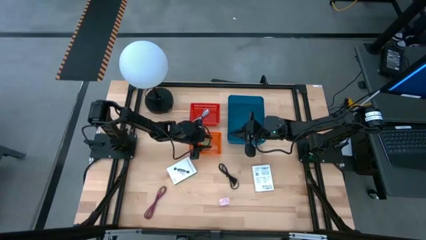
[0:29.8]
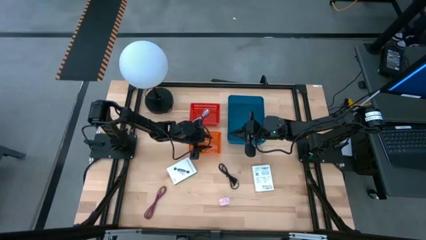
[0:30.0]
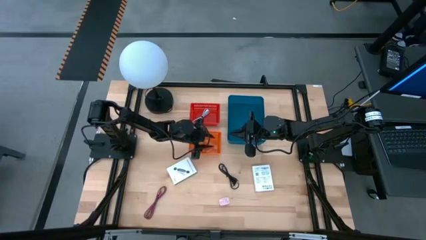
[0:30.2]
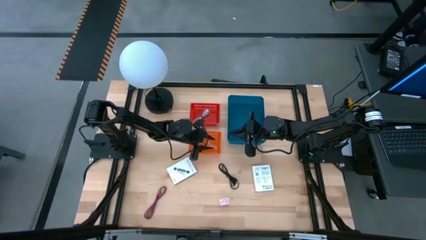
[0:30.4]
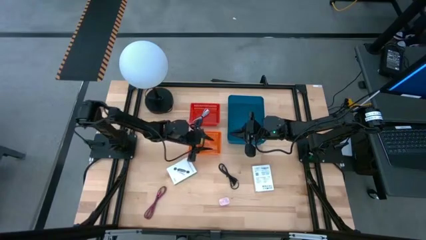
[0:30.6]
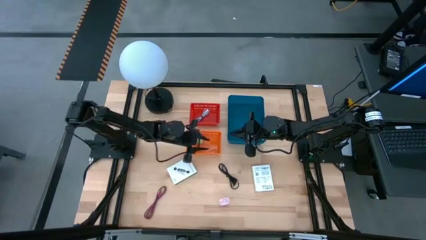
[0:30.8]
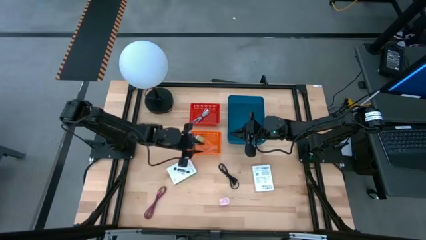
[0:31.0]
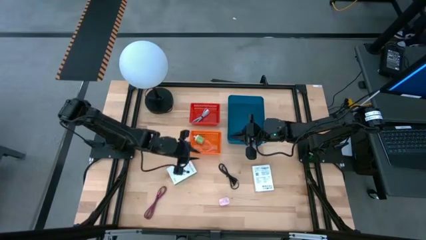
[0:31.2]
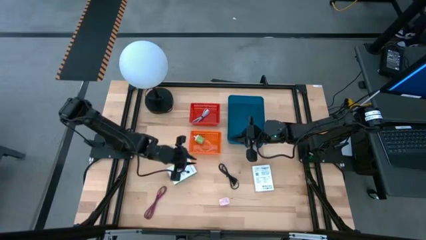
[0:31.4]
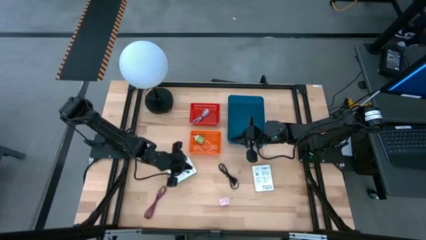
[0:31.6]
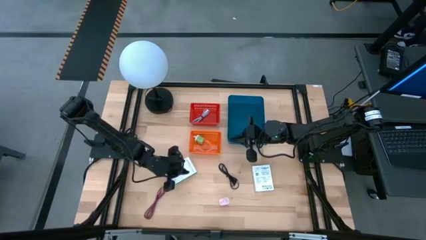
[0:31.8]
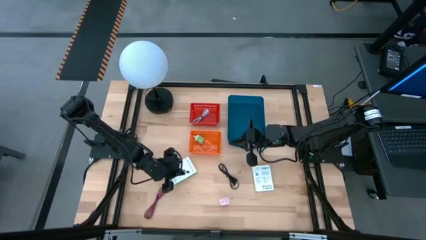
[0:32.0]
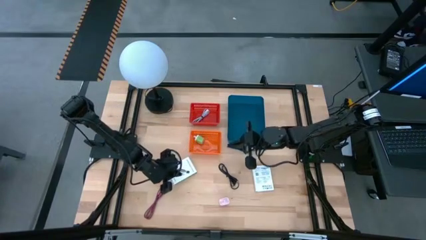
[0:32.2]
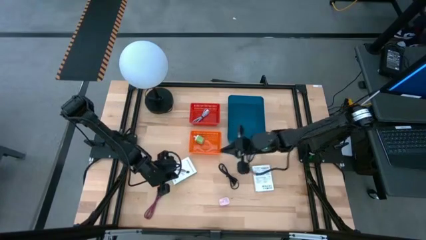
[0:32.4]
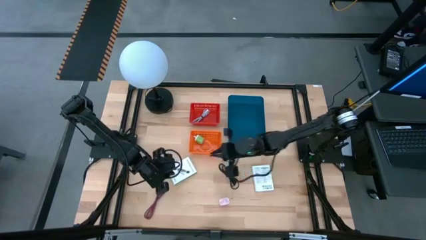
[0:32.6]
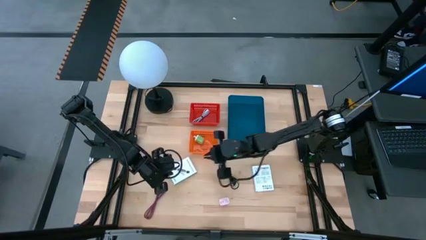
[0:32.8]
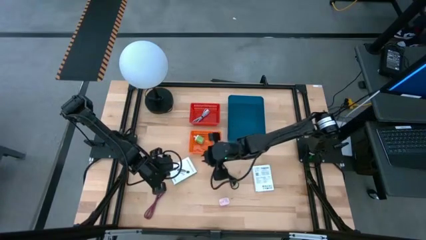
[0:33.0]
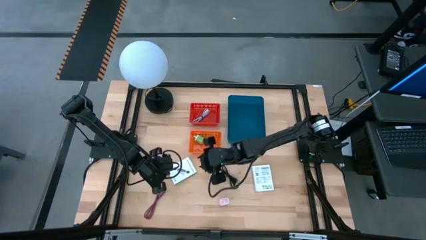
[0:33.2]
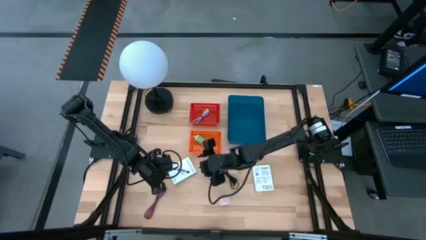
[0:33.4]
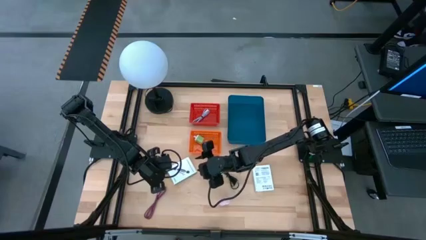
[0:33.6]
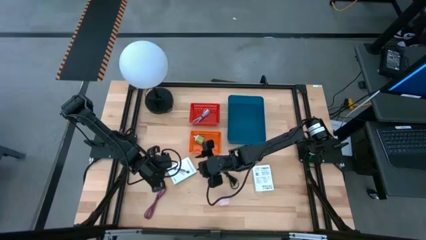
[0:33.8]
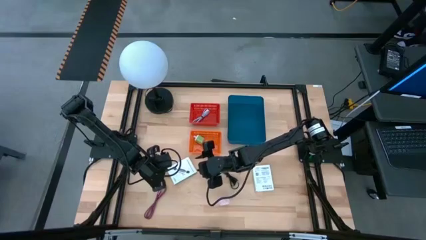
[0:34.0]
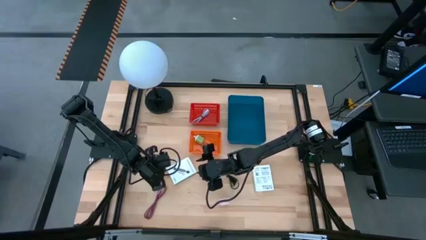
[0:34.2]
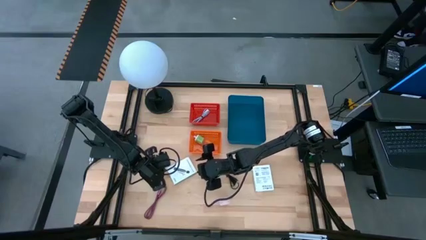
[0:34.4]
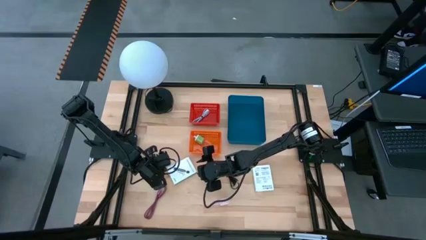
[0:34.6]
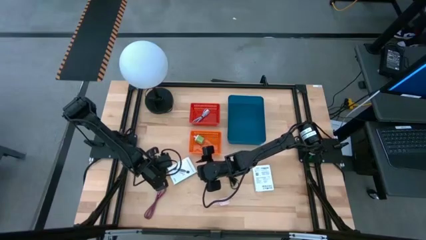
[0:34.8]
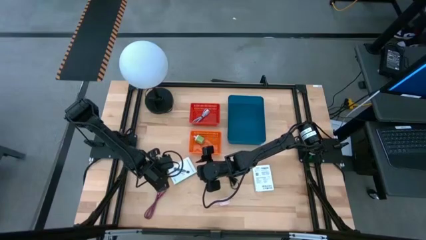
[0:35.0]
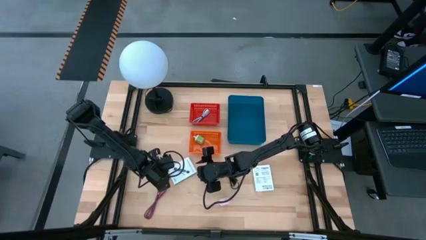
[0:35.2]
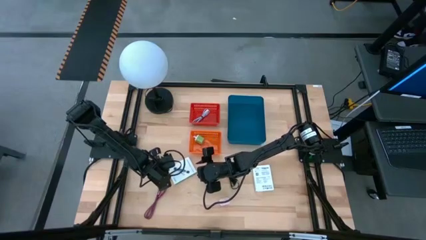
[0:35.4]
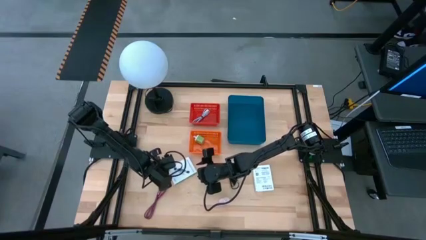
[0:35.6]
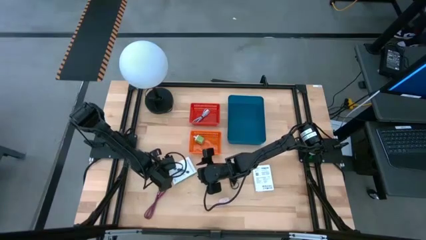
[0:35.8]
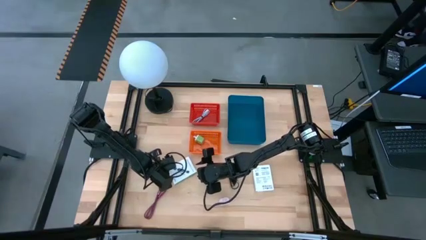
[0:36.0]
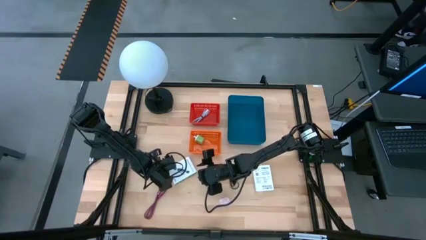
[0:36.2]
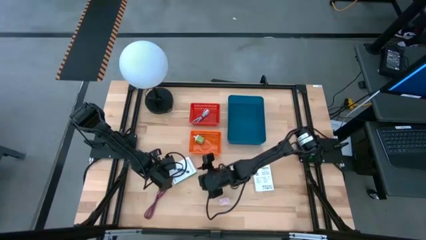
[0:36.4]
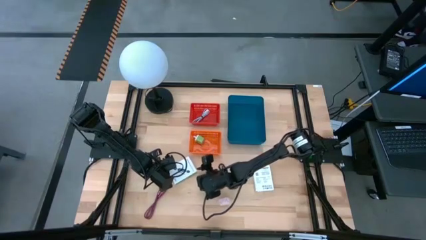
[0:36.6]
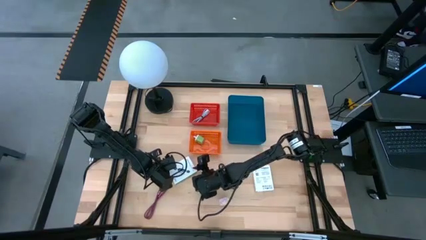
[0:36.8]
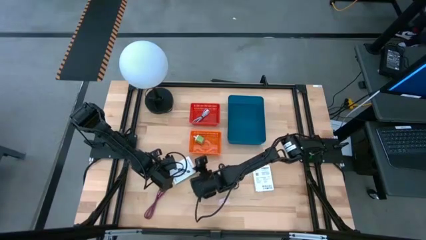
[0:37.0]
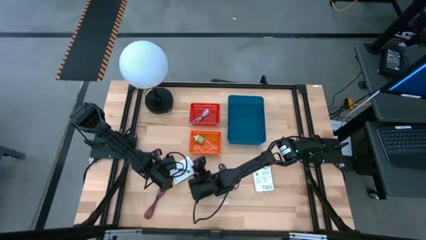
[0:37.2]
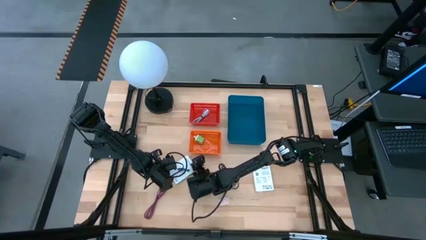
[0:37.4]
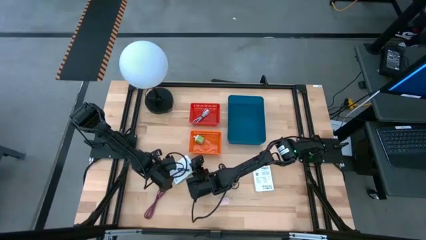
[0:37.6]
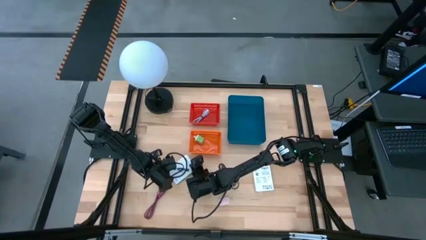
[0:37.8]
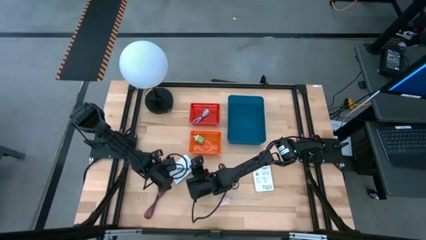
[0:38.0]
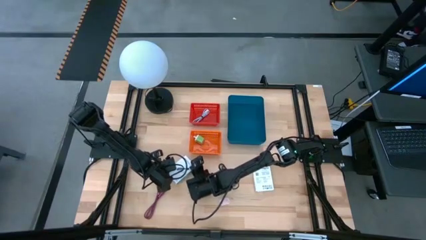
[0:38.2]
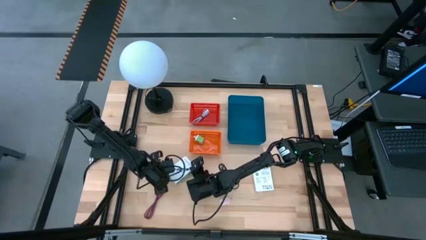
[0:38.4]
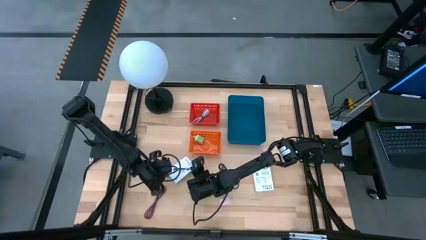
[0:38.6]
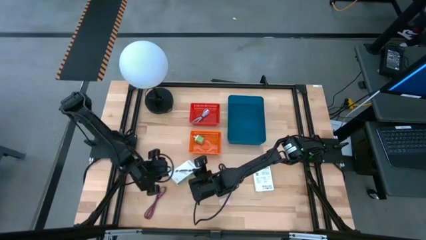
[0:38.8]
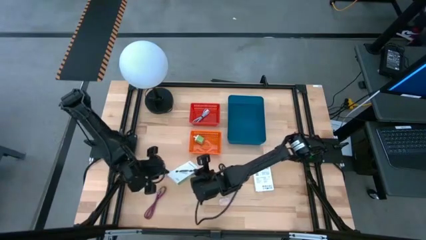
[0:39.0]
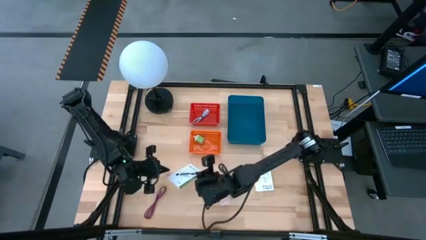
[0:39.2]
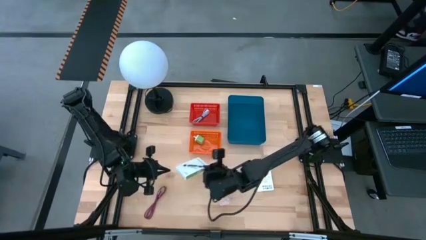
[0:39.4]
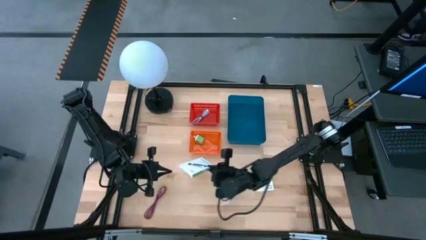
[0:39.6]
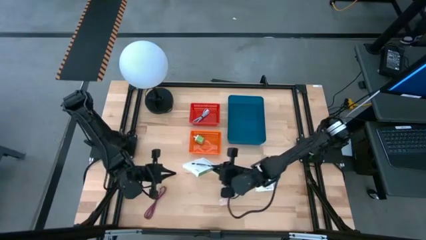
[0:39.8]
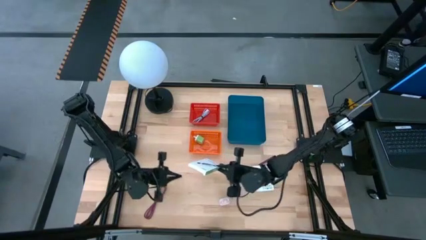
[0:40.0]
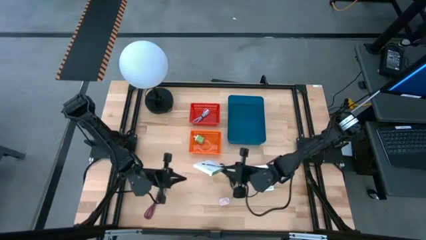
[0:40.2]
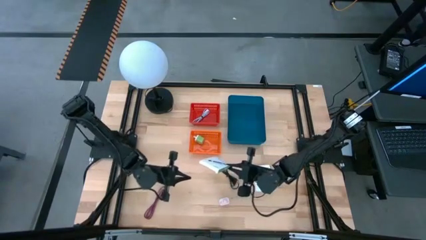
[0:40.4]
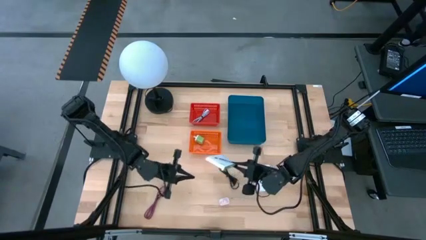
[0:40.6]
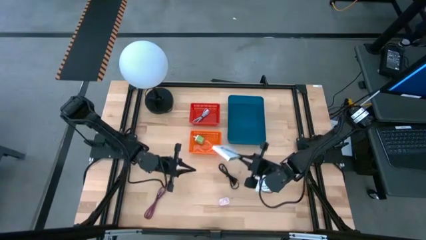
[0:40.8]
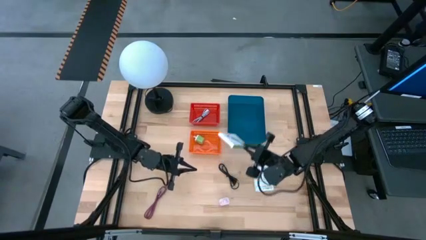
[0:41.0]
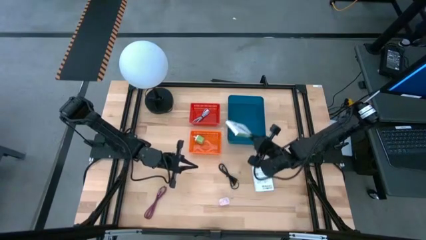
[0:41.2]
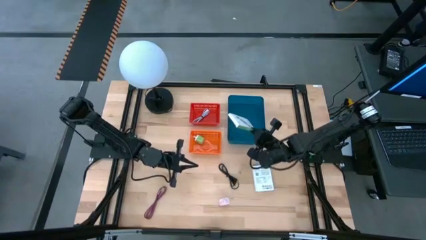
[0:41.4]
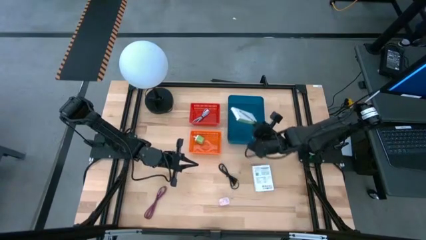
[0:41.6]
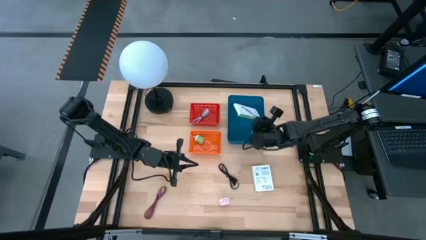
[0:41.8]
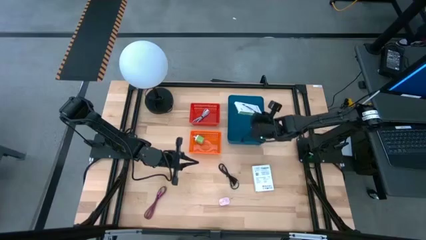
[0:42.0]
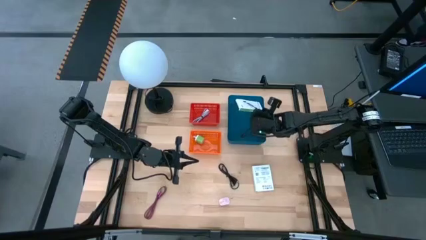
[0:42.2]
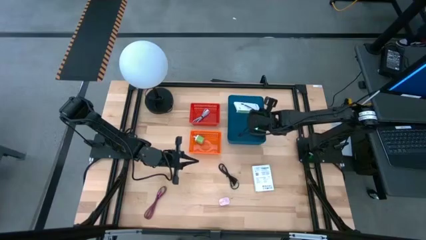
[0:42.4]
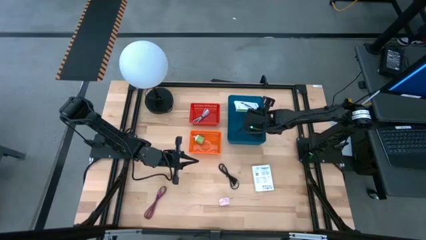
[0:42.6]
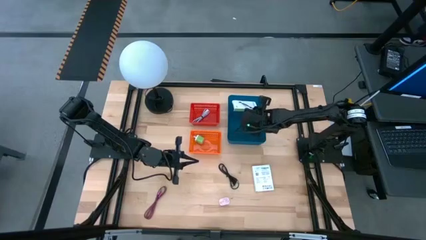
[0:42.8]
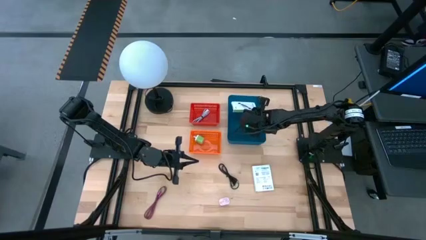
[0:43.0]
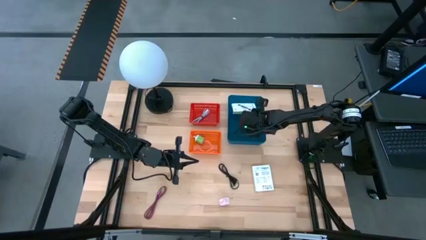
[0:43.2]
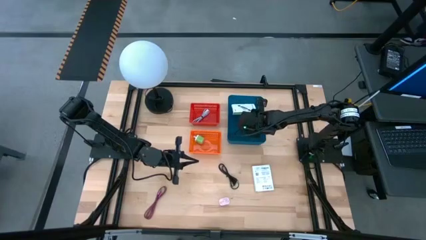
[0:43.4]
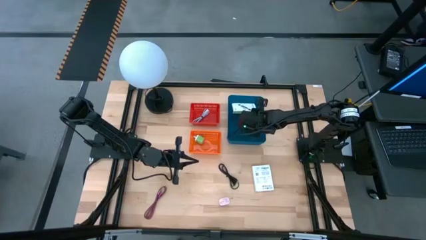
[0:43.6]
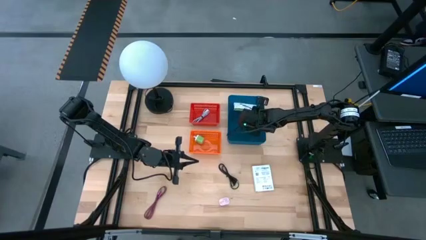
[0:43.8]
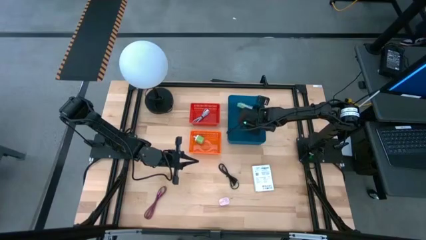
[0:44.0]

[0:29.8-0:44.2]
Task: Pick and place items into bin
Put the left white card reader box into the blue bin
